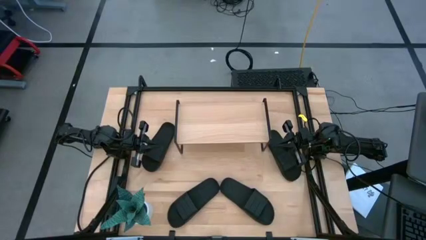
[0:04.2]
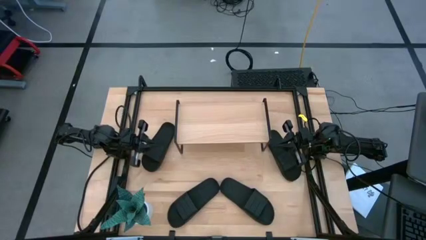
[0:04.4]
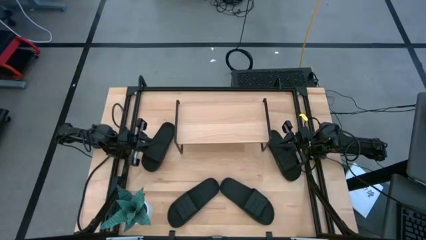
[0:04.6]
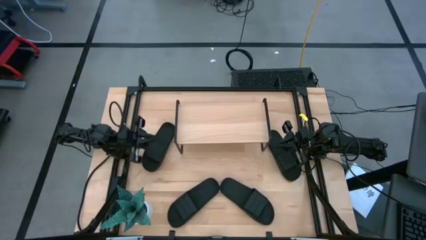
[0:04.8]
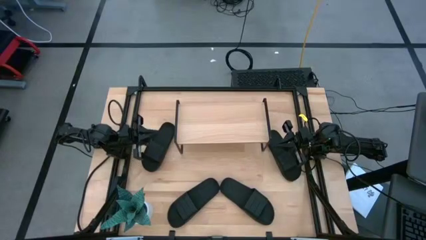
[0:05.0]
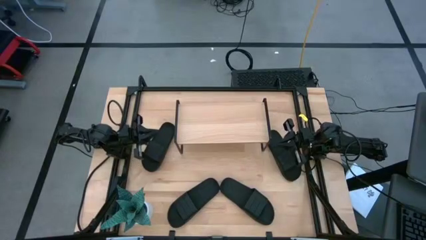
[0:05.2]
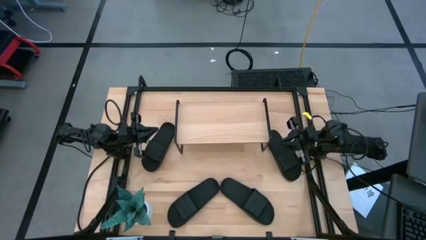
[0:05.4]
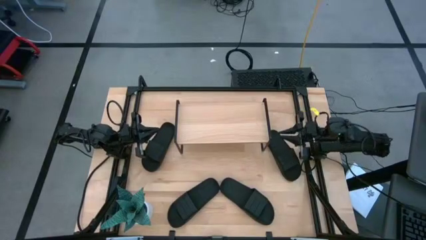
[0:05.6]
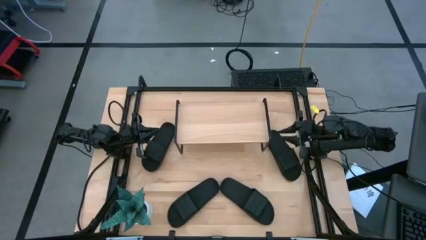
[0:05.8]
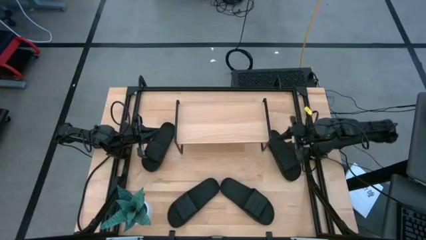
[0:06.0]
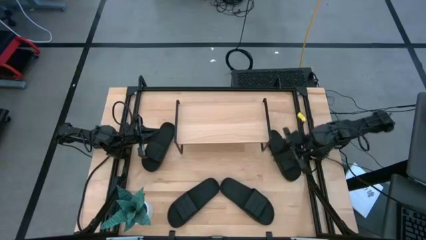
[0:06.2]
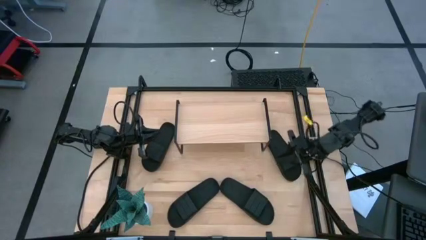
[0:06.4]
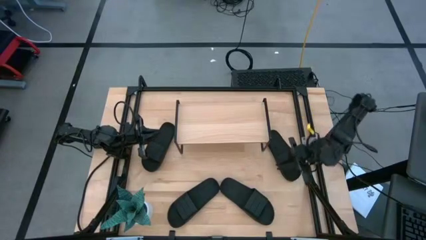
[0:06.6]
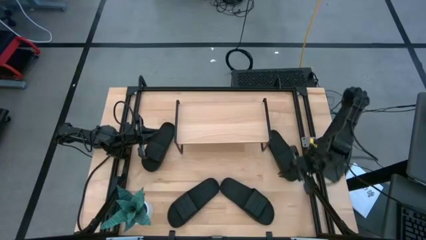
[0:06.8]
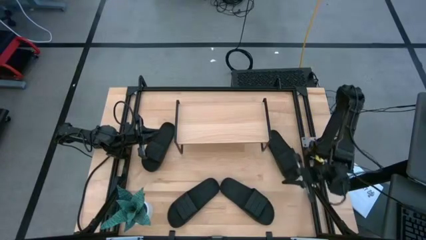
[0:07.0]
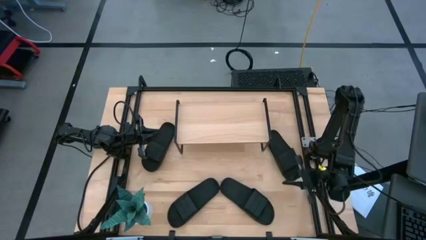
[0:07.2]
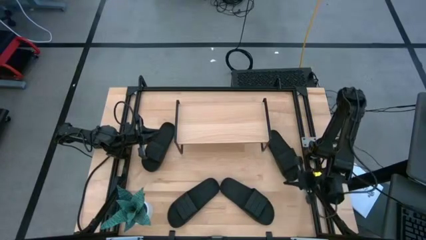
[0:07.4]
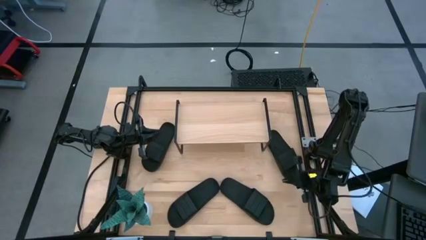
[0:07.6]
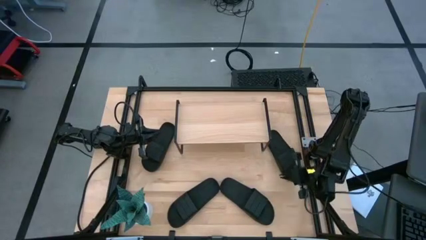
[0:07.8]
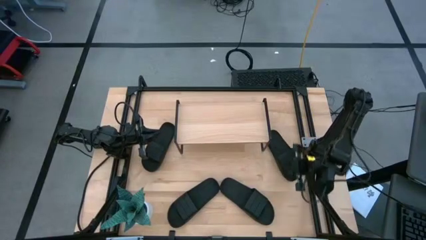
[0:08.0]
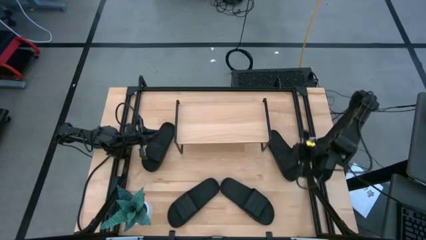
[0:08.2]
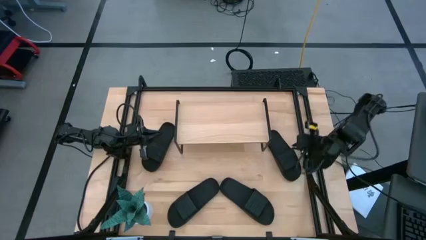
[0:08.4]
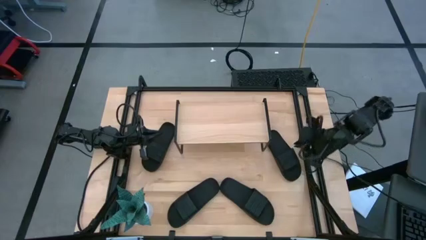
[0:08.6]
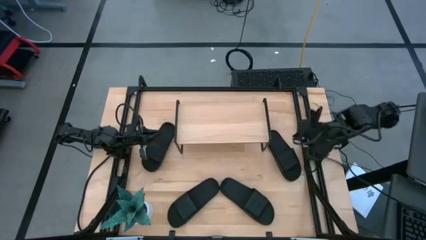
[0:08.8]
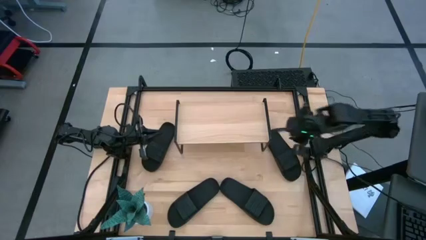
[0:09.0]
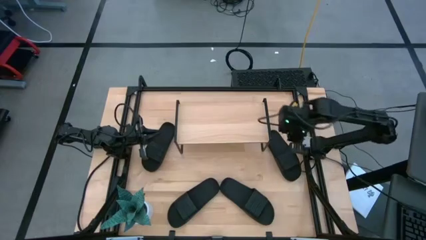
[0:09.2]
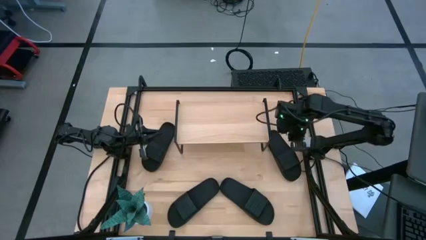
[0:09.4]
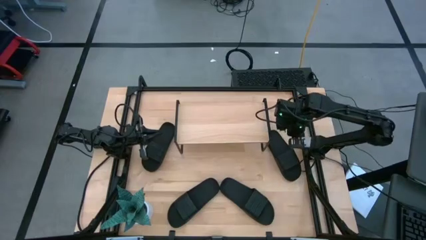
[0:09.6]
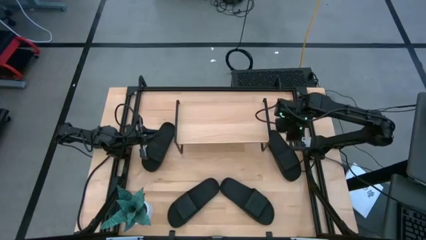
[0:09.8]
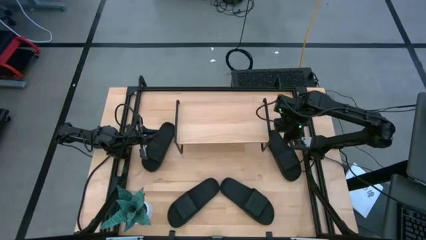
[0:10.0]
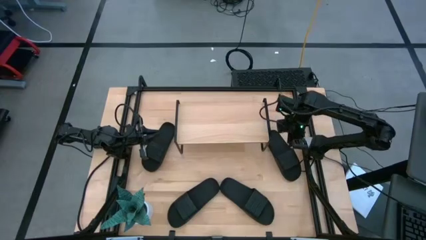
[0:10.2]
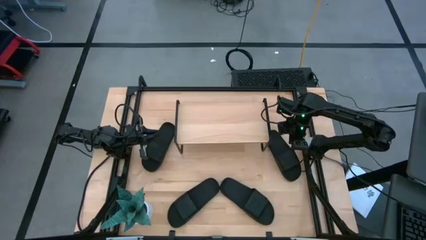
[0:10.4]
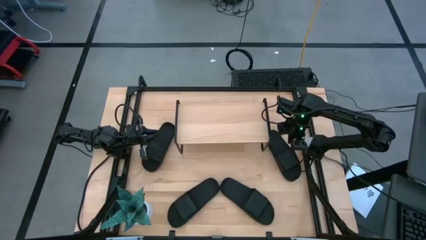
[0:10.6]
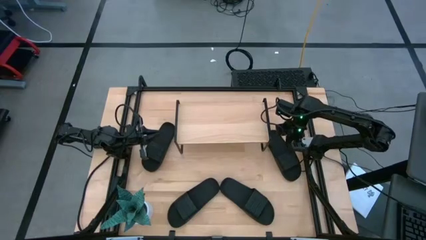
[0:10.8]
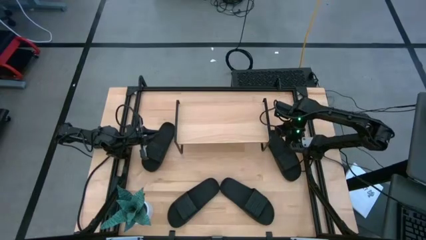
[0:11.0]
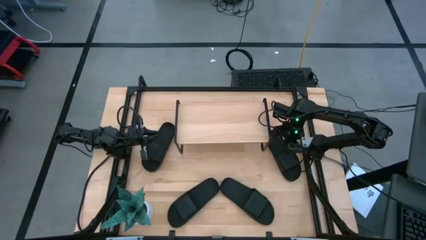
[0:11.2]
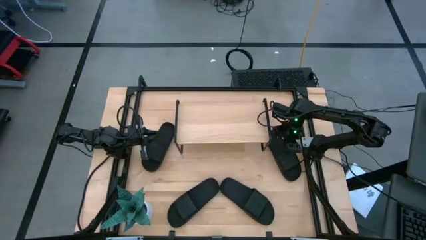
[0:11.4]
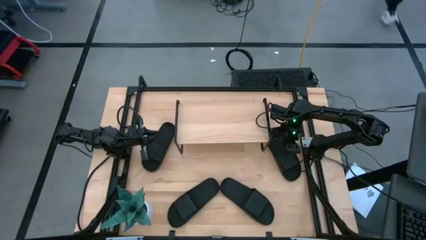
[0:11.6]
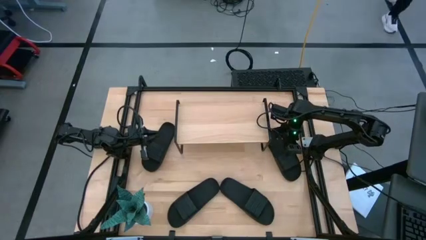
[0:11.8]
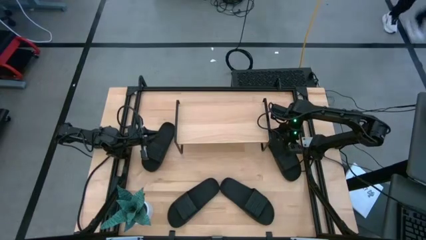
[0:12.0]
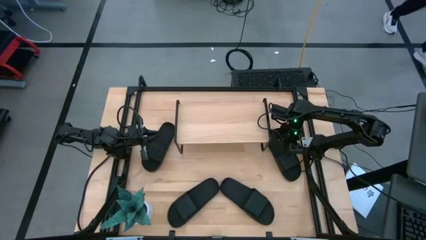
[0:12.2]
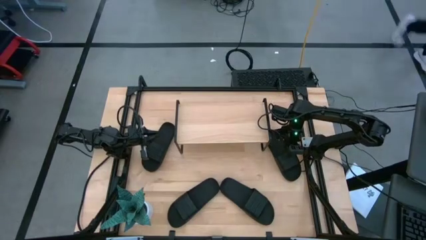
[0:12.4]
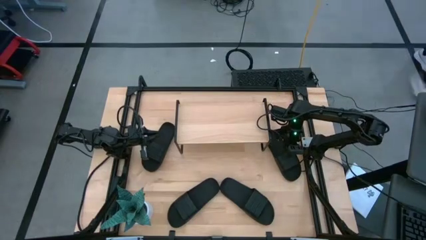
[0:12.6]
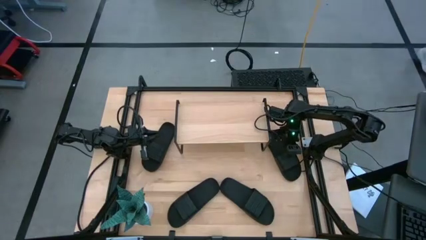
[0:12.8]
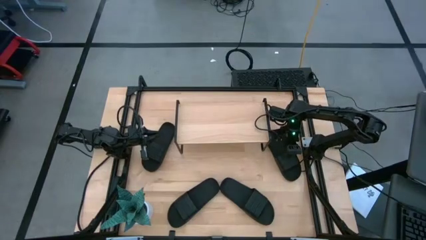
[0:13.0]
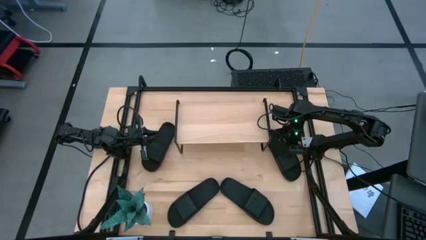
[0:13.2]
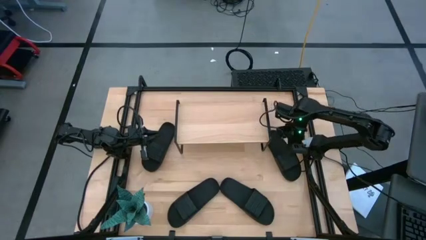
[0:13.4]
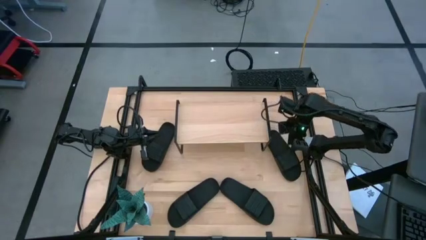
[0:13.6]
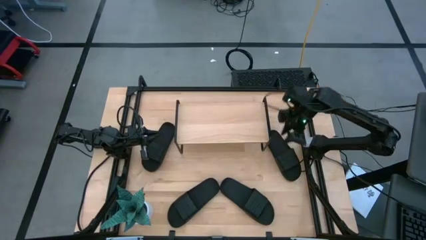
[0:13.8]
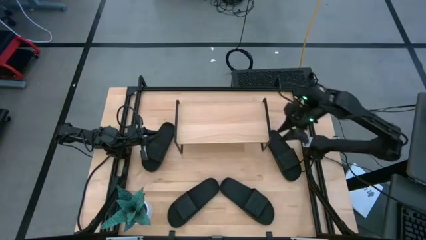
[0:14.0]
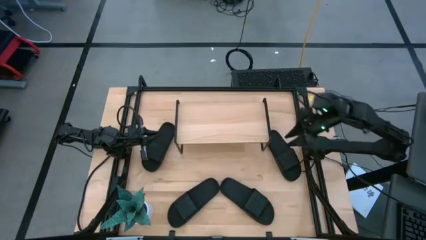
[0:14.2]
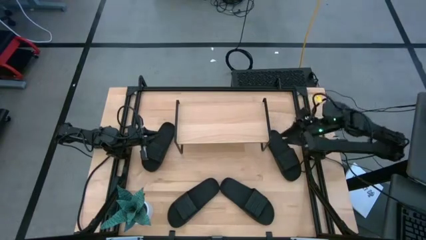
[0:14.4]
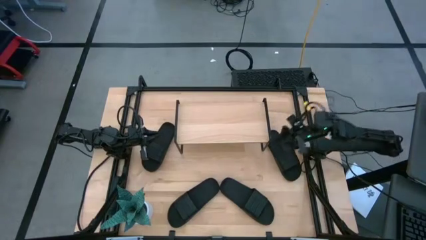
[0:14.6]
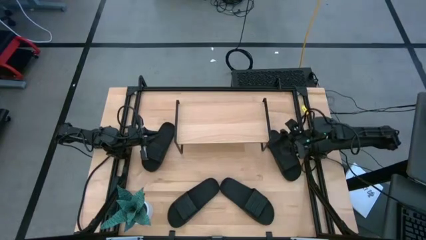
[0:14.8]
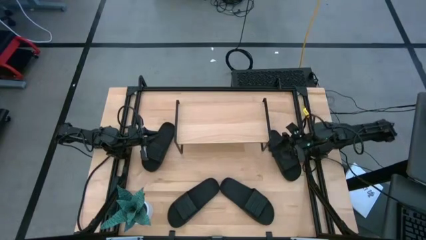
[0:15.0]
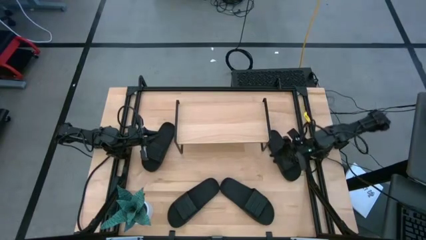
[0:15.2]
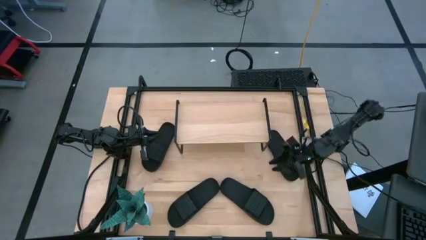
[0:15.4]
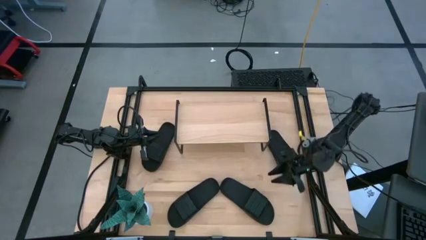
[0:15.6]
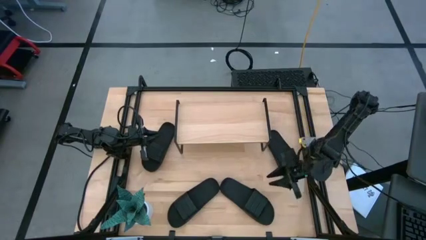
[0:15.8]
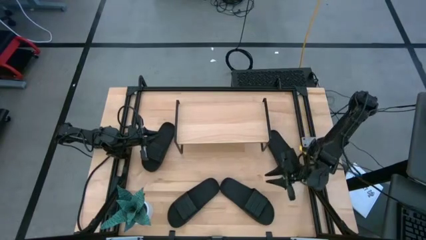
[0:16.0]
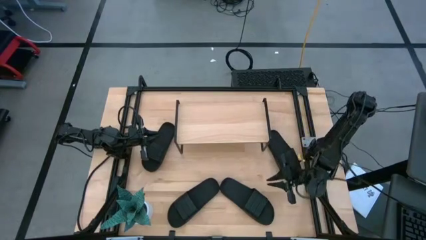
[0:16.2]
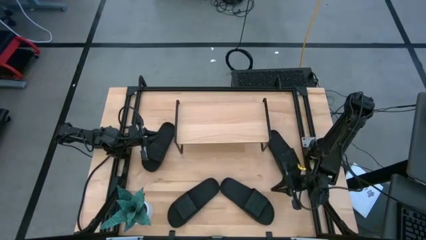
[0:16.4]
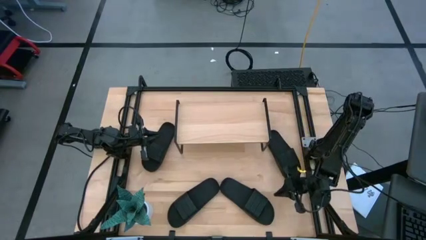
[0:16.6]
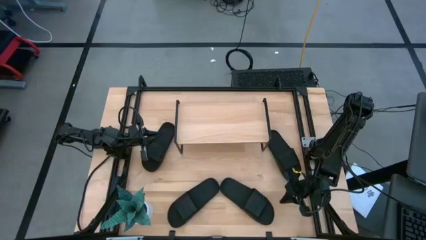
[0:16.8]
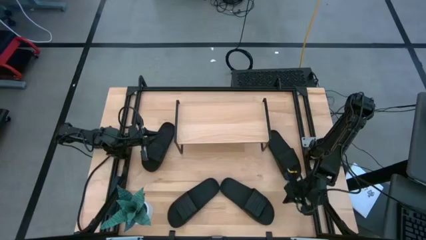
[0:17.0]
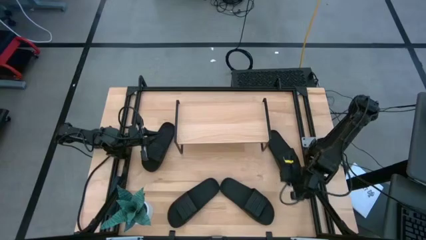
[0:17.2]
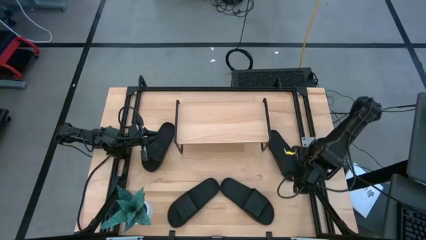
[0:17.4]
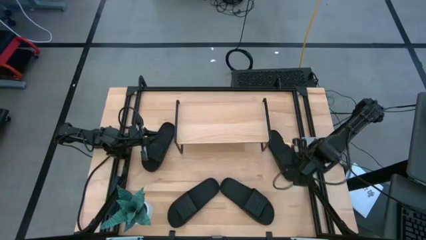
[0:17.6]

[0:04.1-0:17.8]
Task: Pick and place slides into the shelf
Put the top right black slide on the shelf
